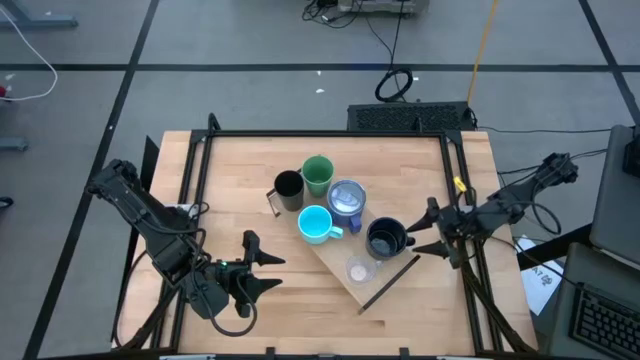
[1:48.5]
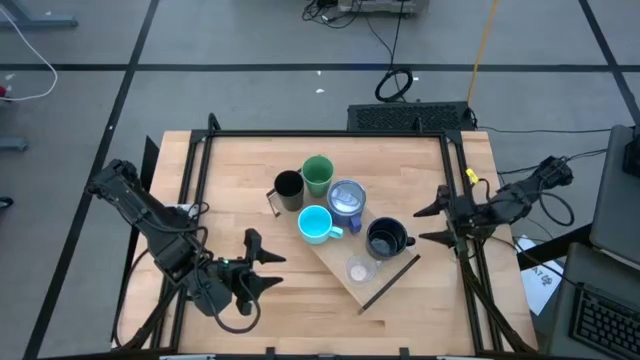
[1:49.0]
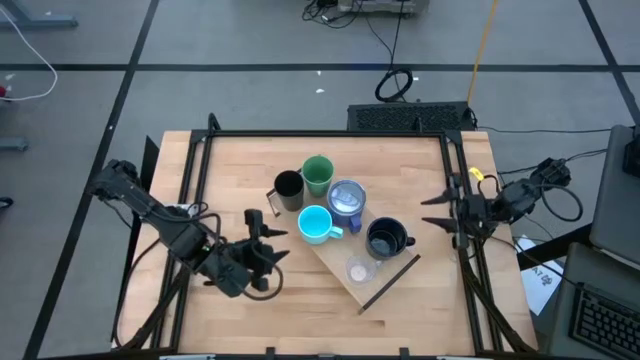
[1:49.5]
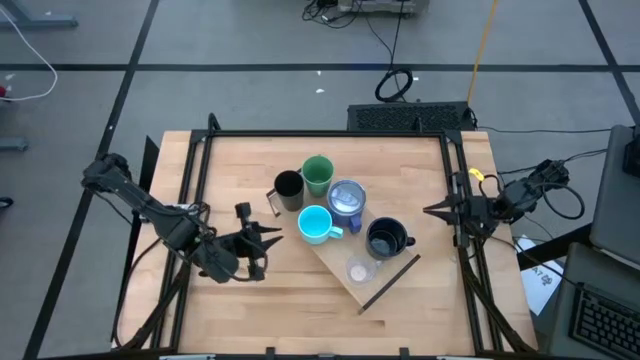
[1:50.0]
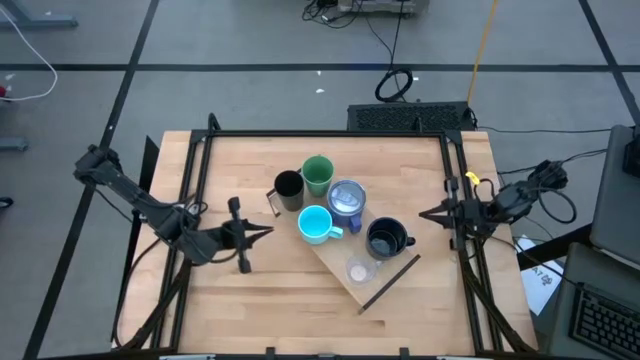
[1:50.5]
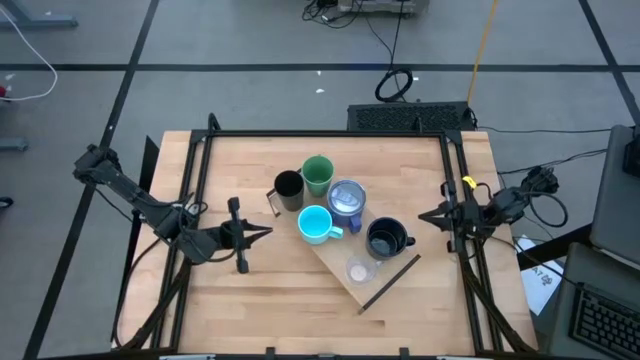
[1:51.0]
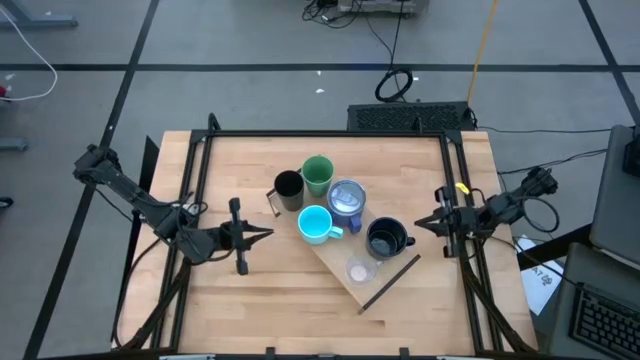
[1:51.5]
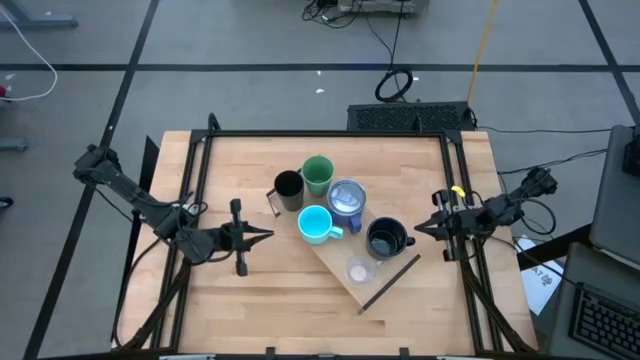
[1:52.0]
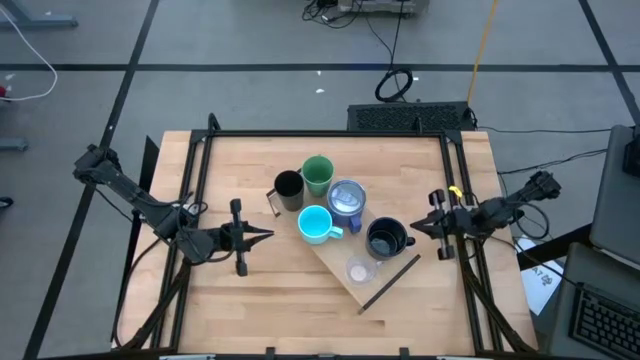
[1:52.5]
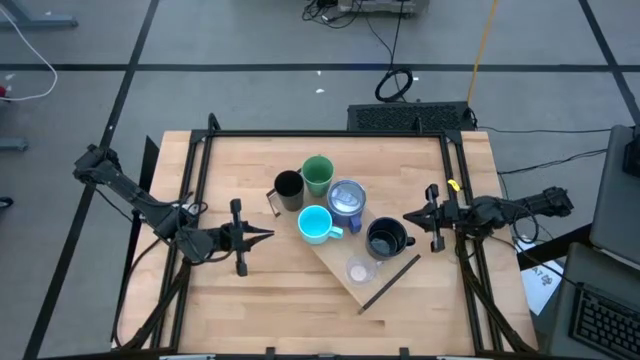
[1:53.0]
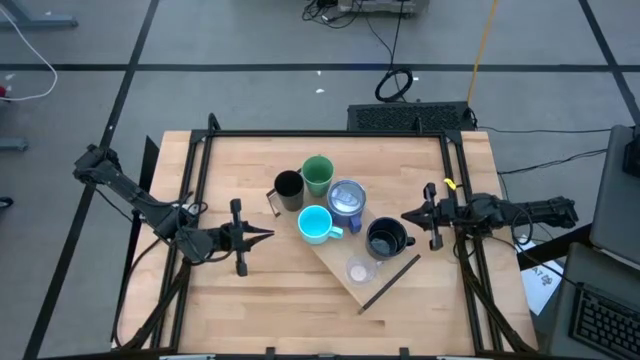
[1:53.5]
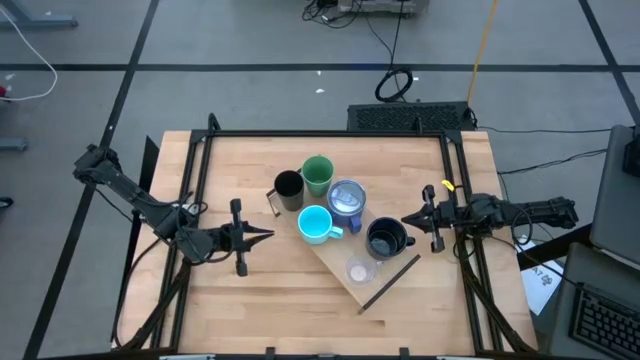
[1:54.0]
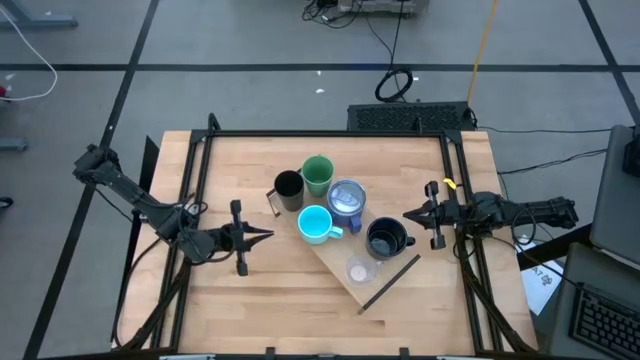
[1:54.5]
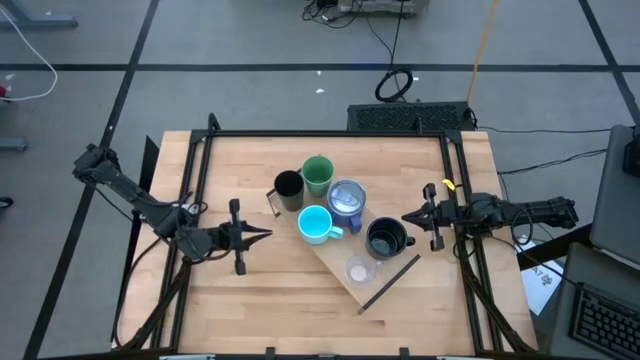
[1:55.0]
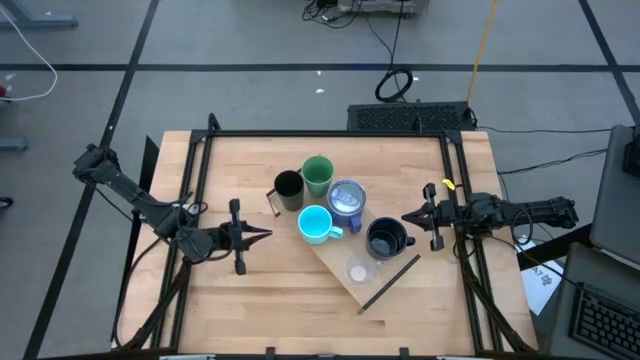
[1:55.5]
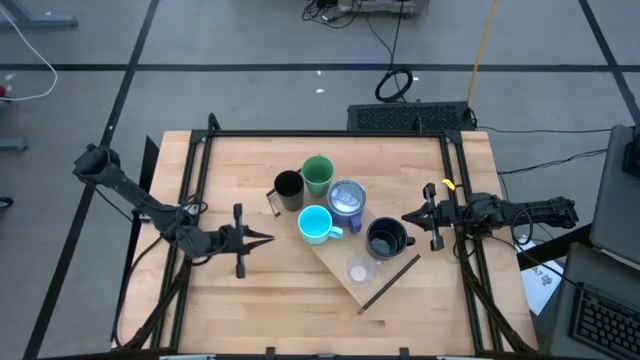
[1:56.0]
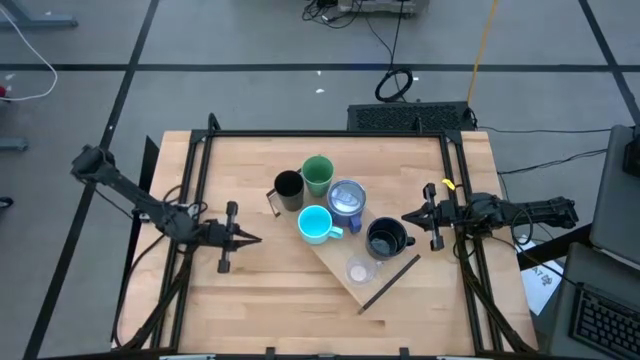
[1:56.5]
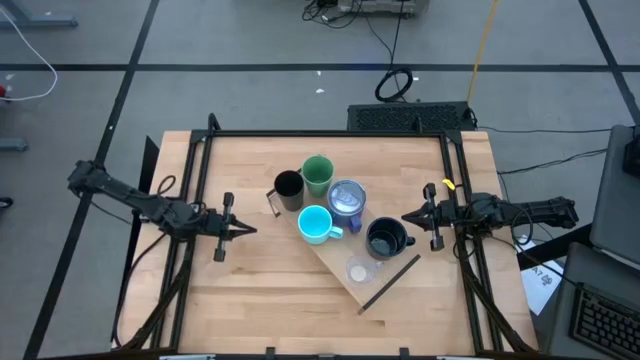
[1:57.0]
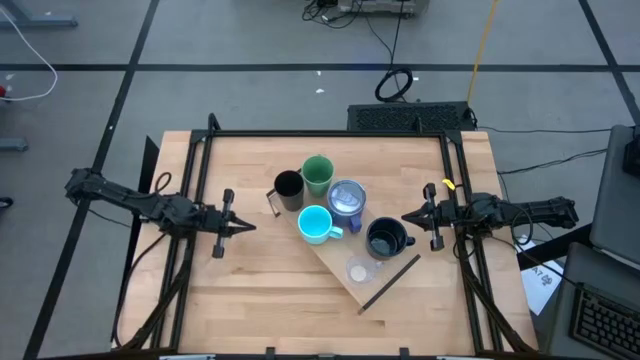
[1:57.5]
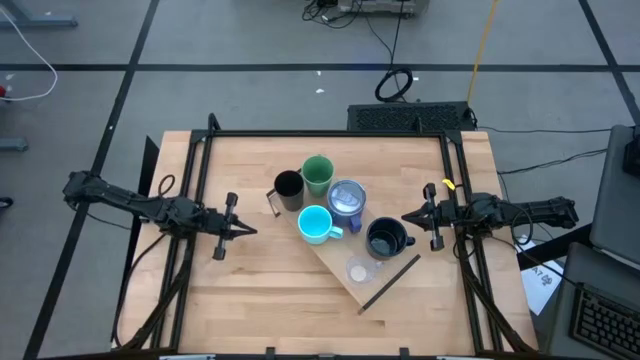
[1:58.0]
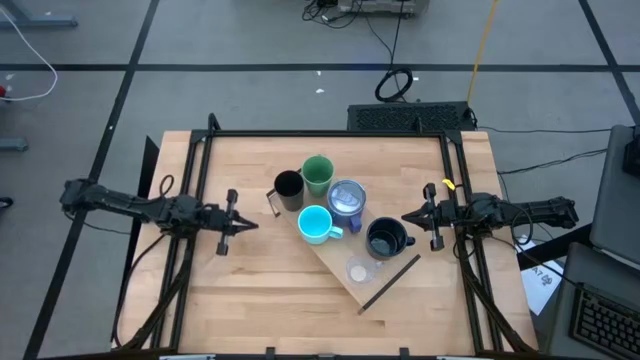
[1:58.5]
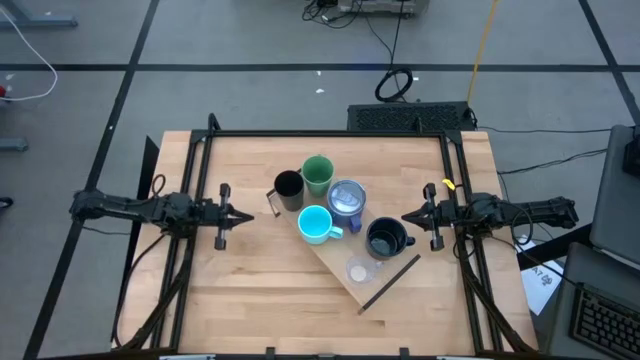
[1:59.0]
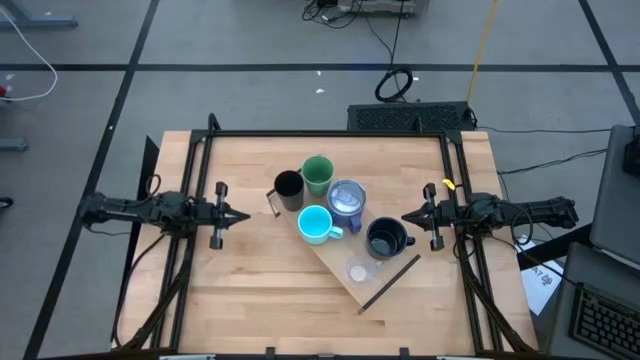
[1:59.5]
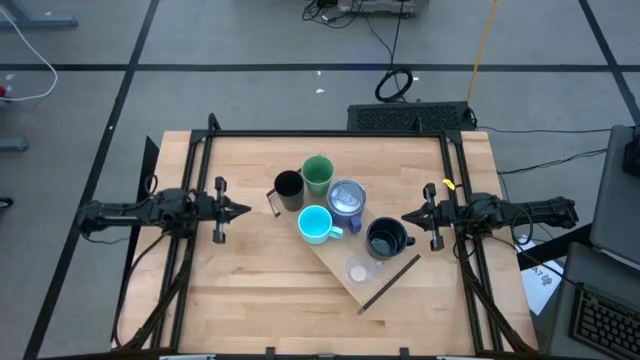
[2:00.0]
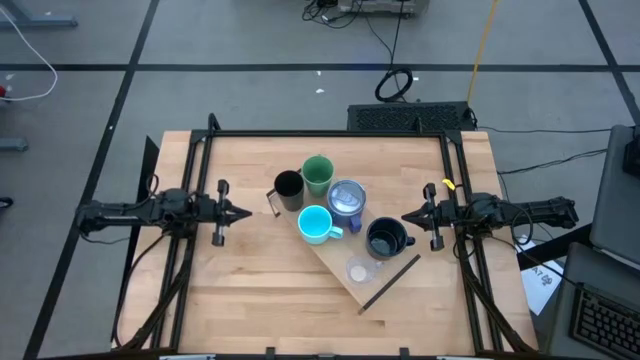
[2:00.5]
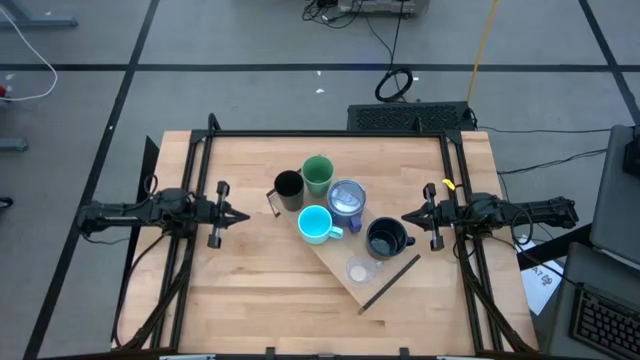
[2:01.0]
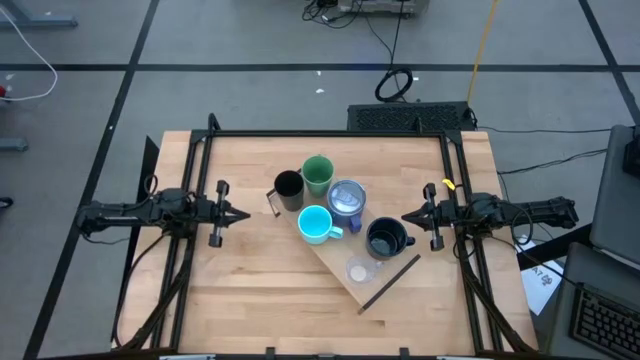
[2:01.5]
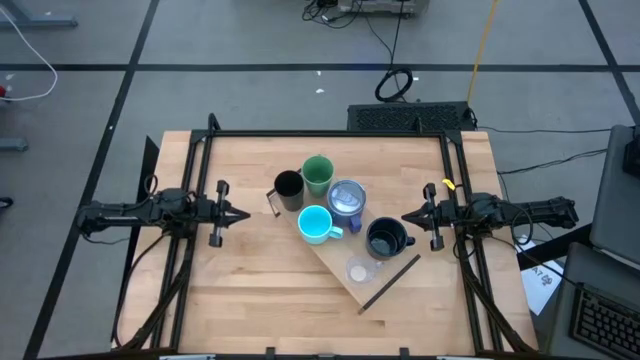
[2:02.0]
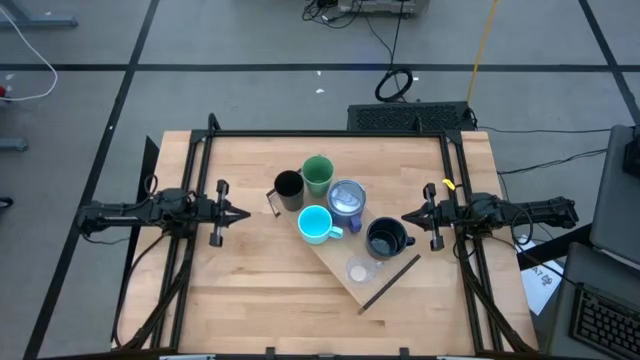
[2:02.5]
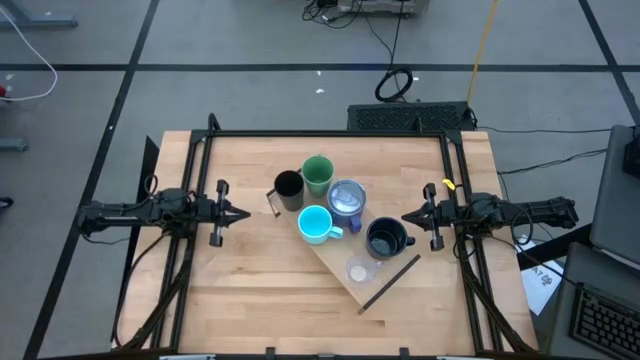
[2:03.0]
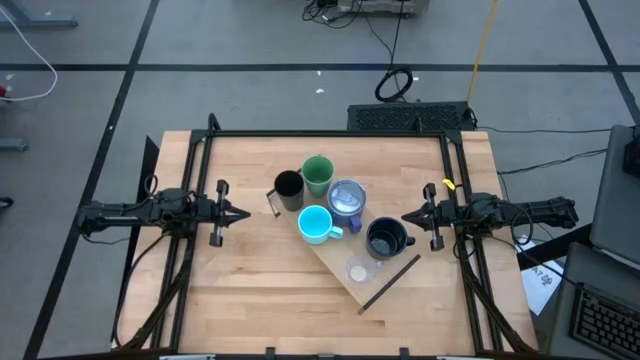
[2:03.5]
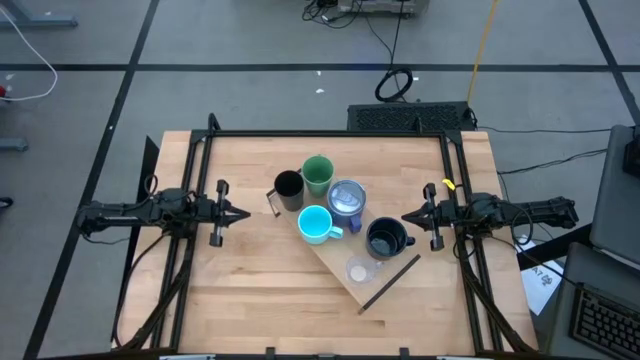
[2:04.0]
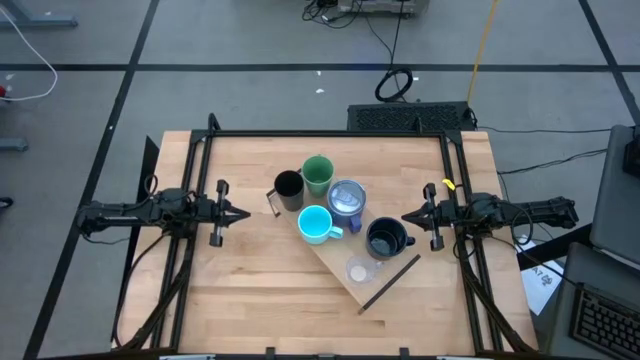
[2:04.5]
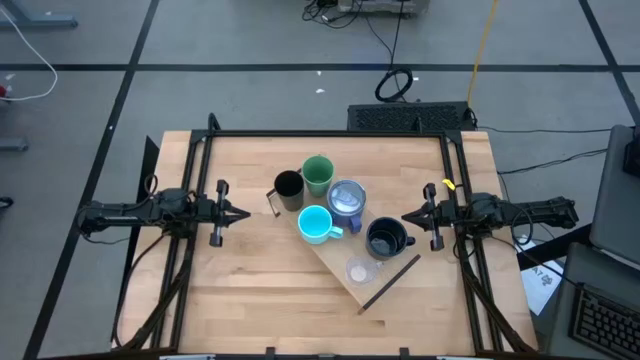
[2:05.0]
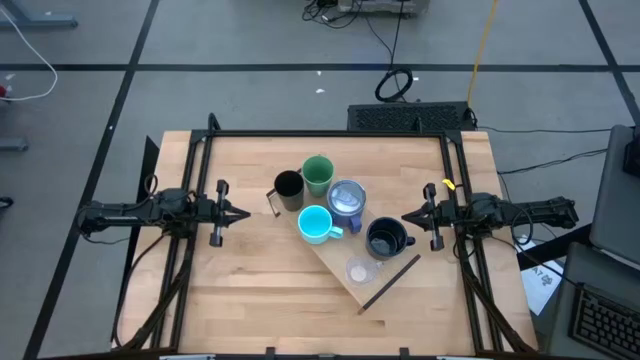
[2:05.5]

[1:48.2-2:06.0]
Task: Stack small to large cups/mugs on shelf
Return to Home Position

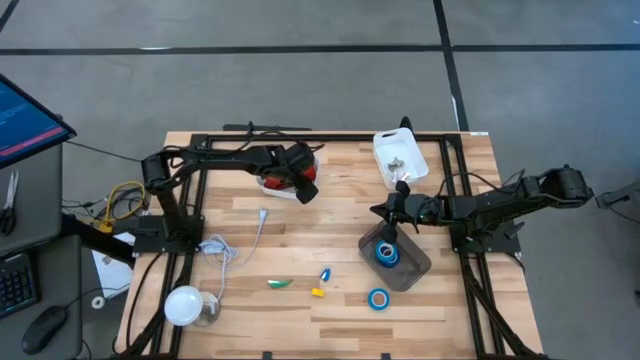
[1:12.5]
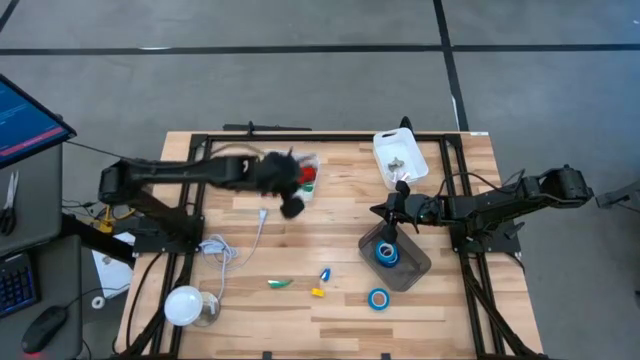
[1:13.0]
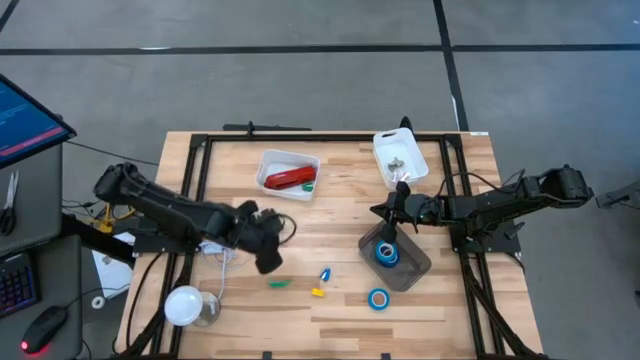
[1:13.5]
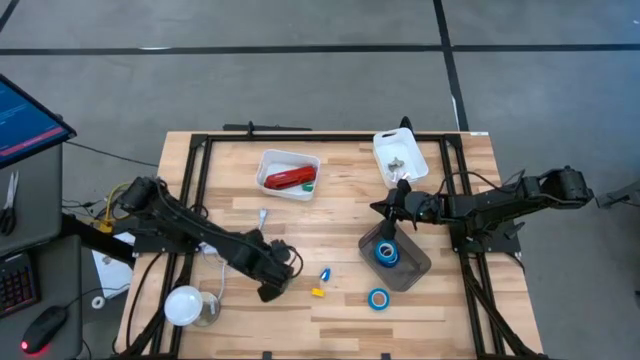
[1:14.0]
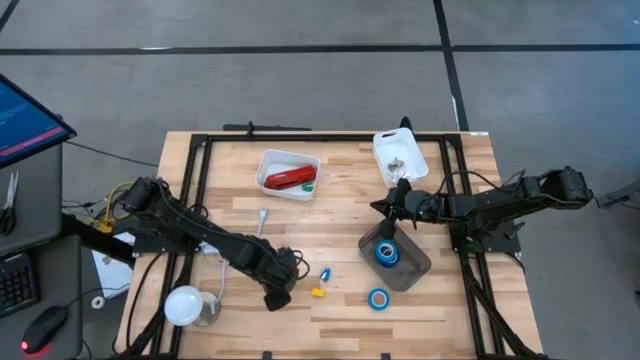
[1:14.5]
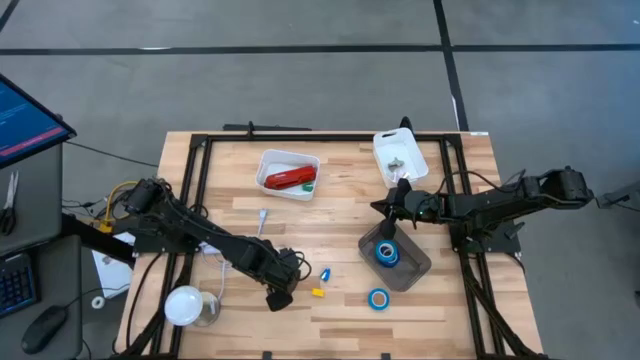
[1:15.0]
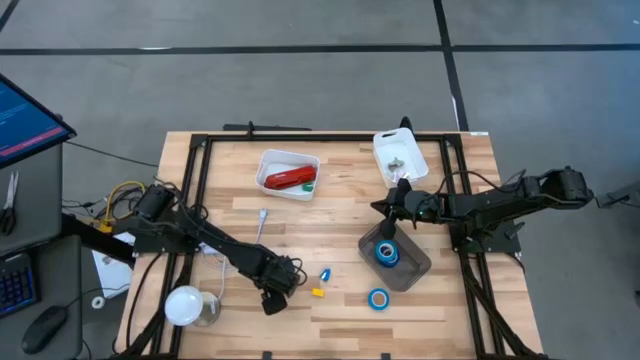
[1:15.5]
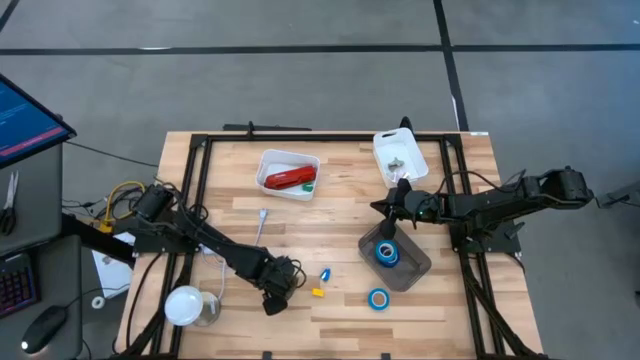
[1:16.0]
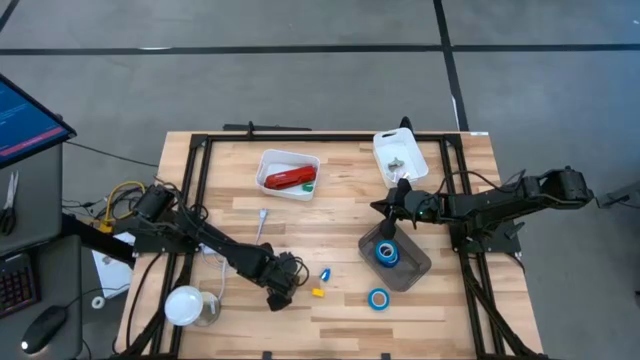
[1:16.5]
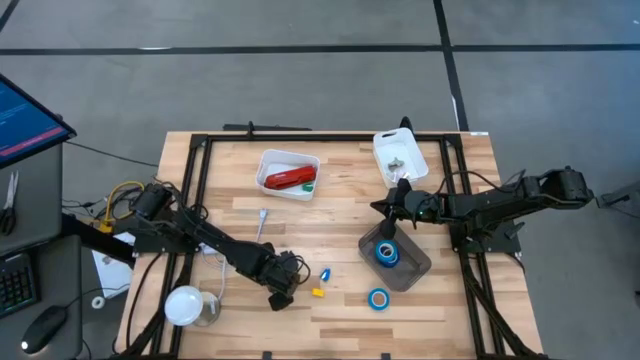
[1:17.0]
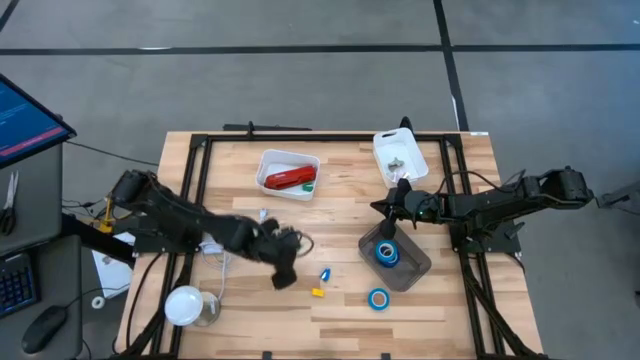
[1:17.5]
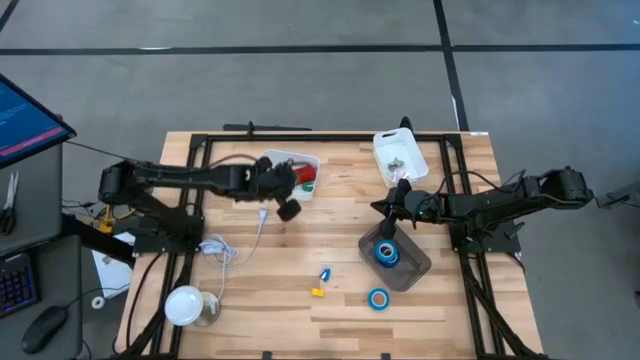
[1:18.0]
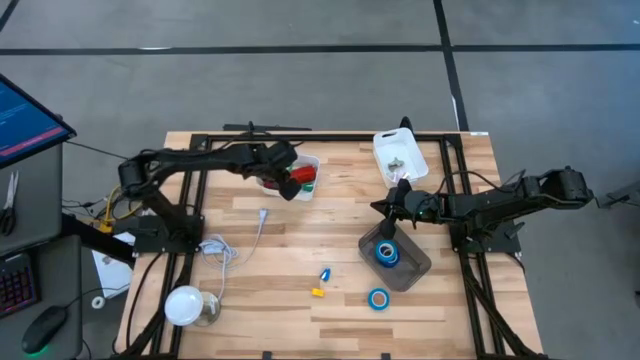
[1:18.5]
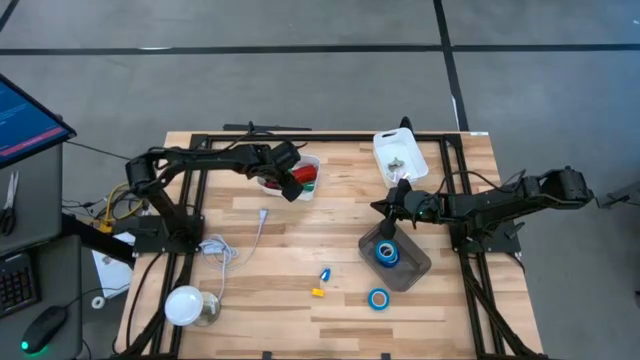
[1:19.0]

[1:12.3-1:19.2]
Task: Pick and place Stapler, Stapler remover, tape
Put the green small stapler into the left white bin
